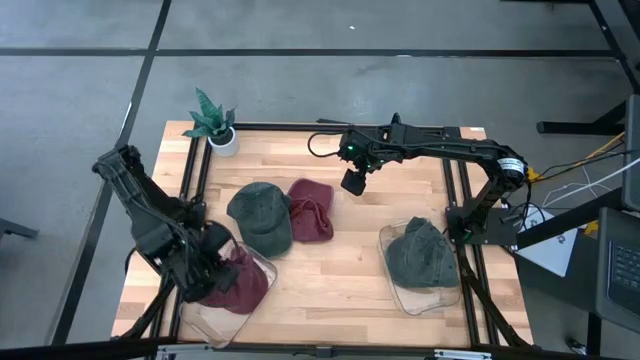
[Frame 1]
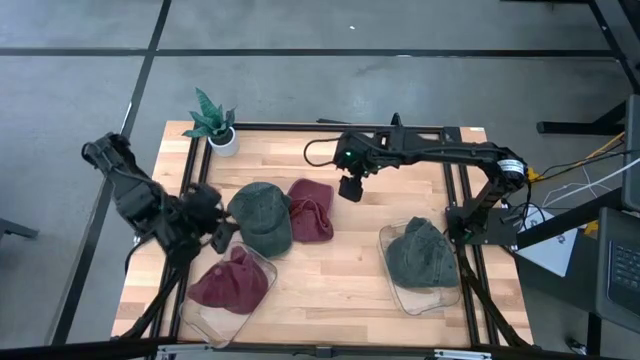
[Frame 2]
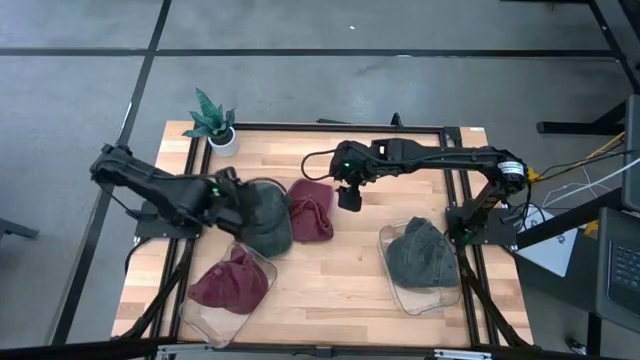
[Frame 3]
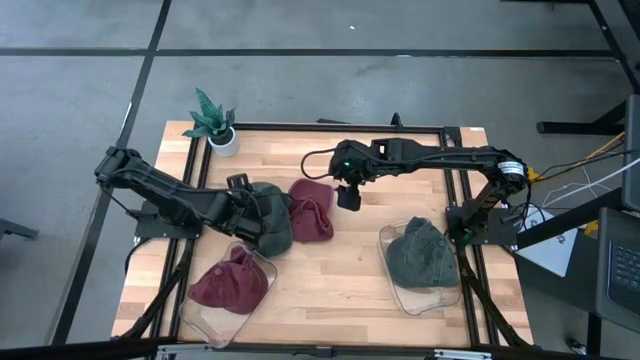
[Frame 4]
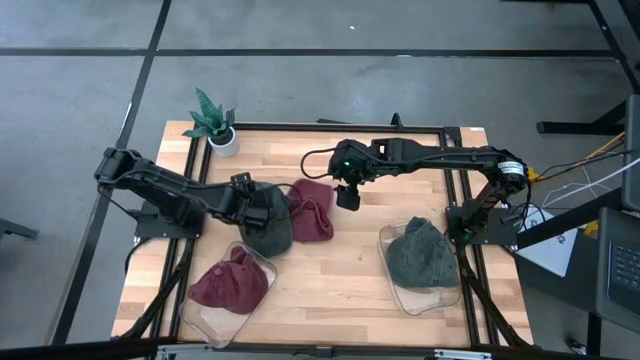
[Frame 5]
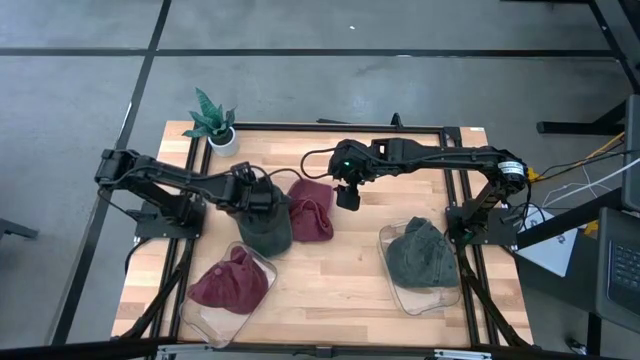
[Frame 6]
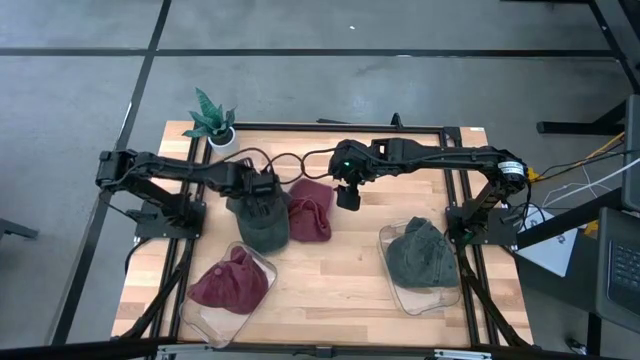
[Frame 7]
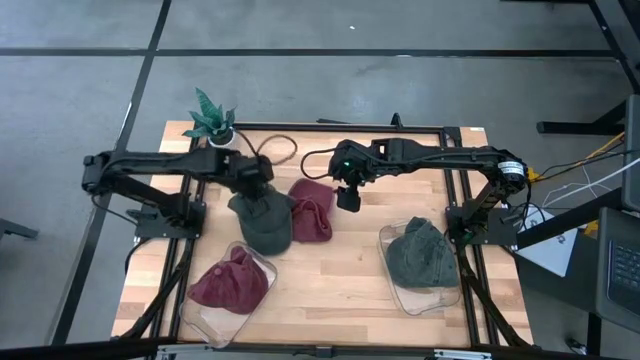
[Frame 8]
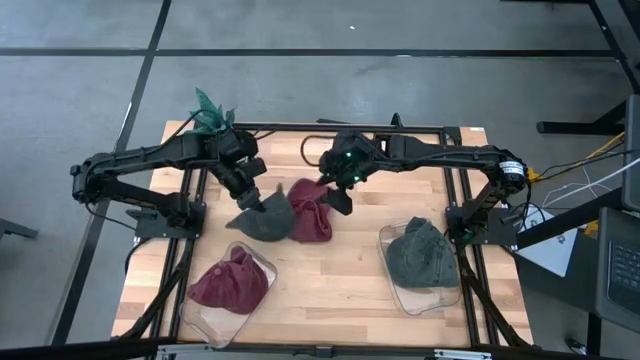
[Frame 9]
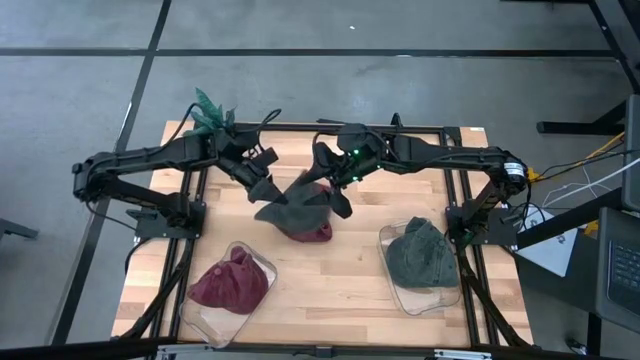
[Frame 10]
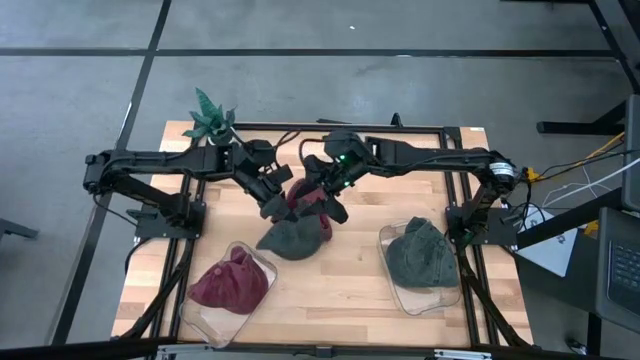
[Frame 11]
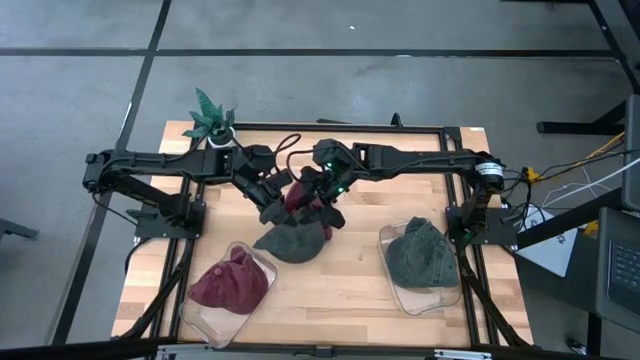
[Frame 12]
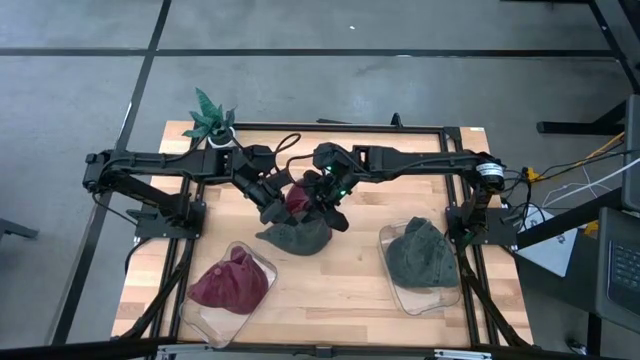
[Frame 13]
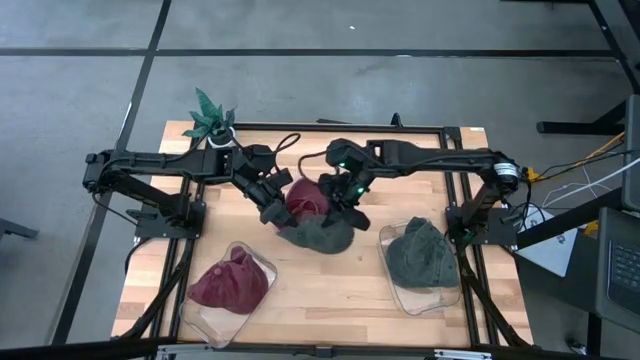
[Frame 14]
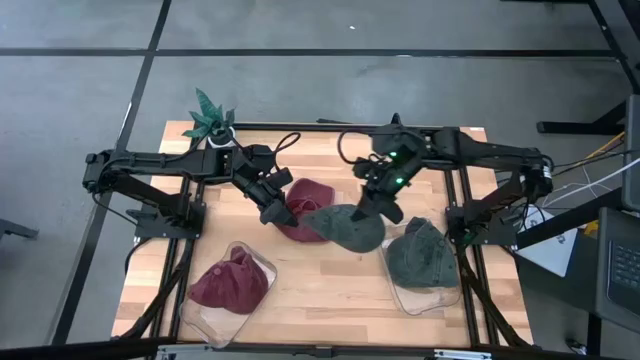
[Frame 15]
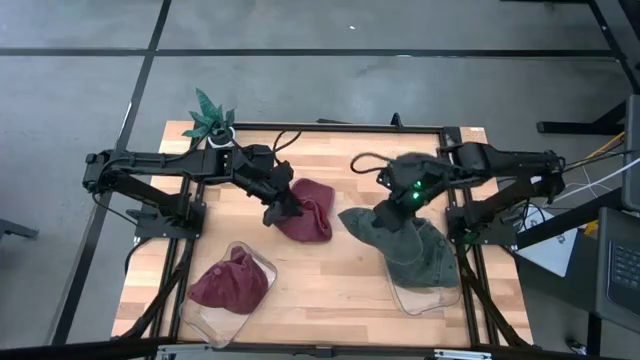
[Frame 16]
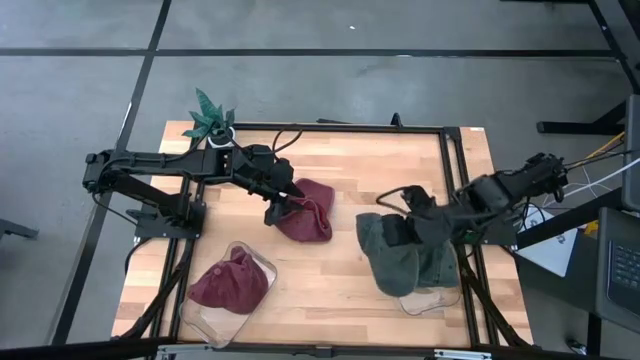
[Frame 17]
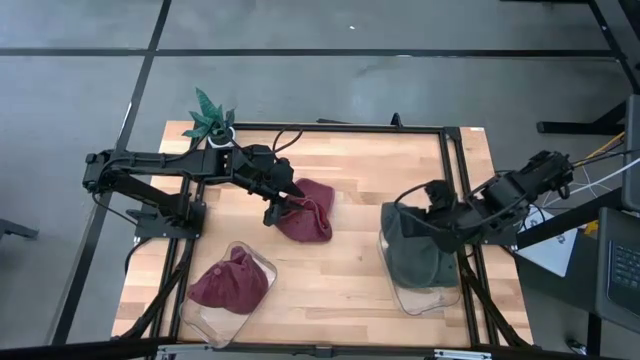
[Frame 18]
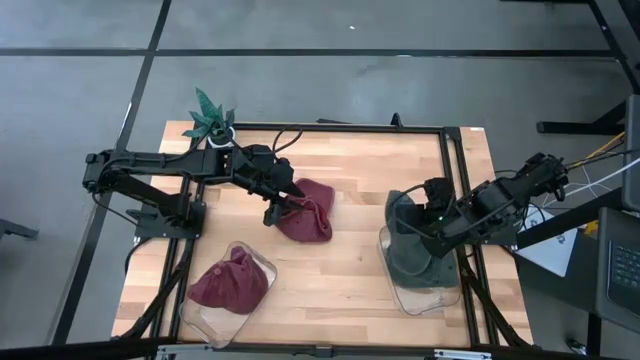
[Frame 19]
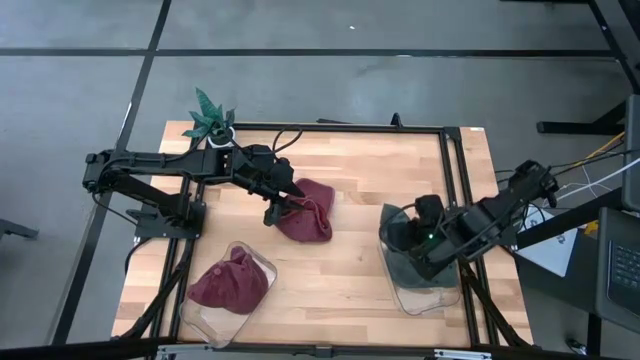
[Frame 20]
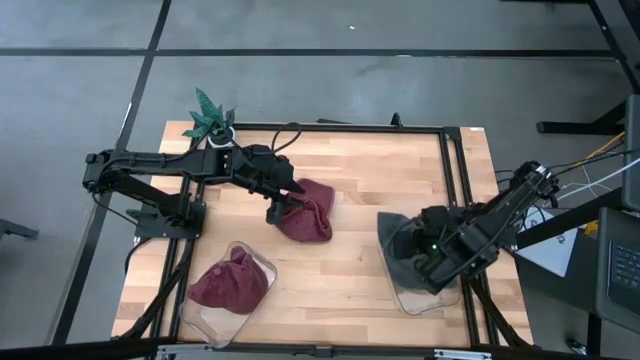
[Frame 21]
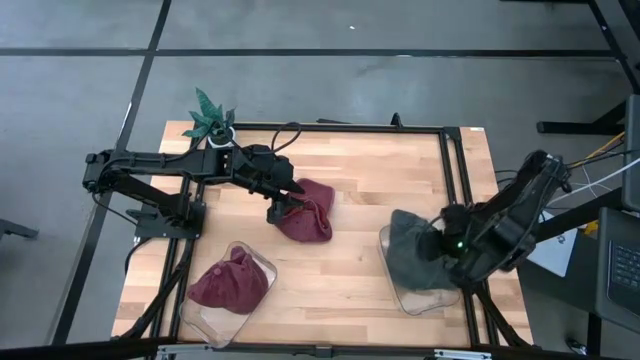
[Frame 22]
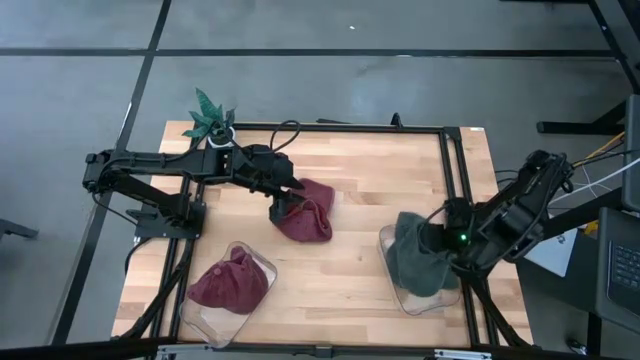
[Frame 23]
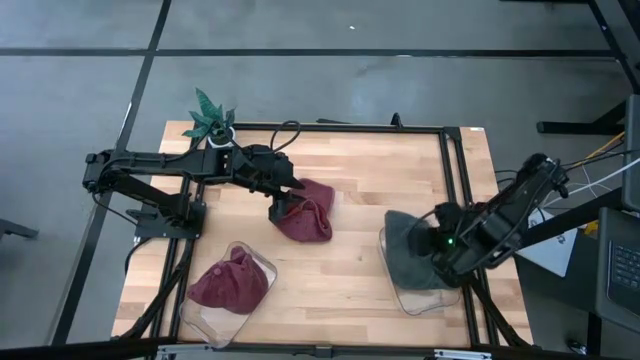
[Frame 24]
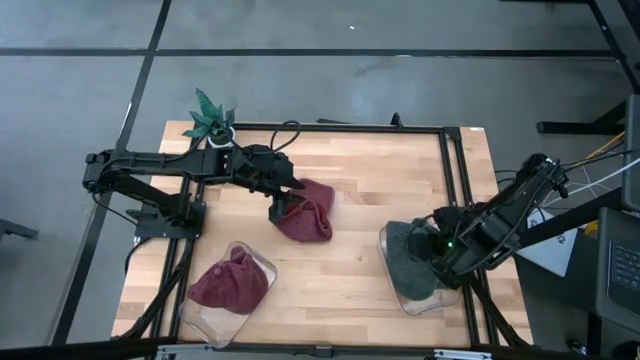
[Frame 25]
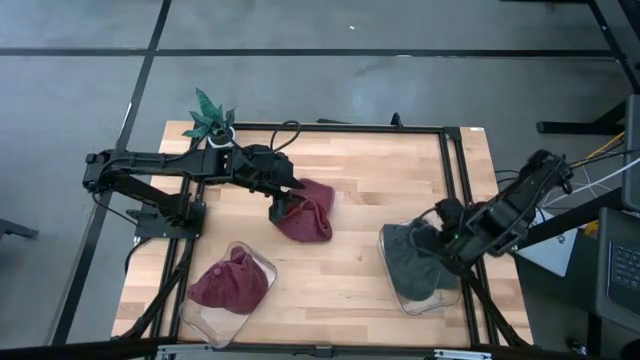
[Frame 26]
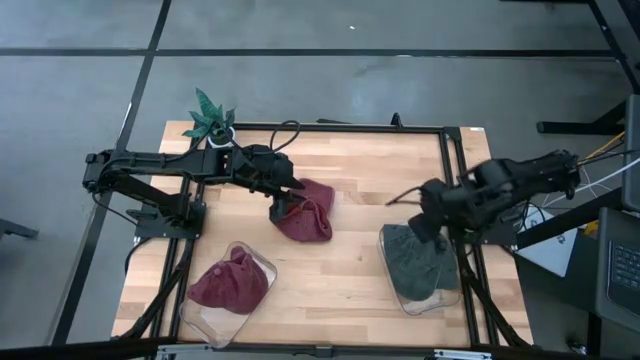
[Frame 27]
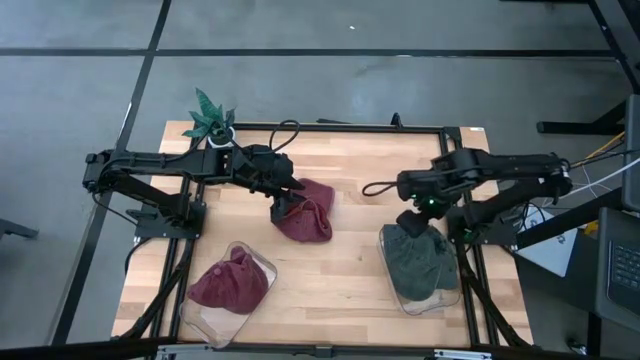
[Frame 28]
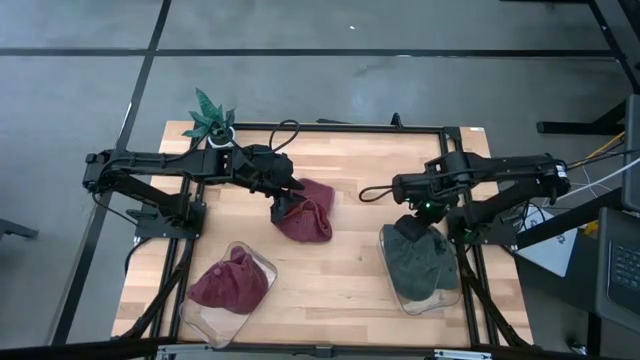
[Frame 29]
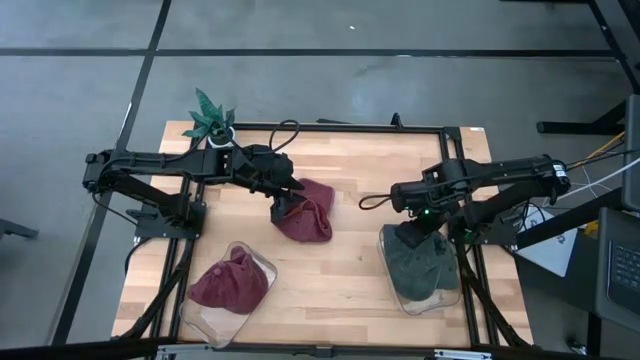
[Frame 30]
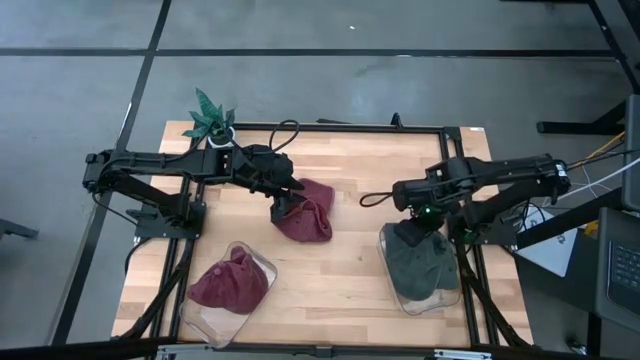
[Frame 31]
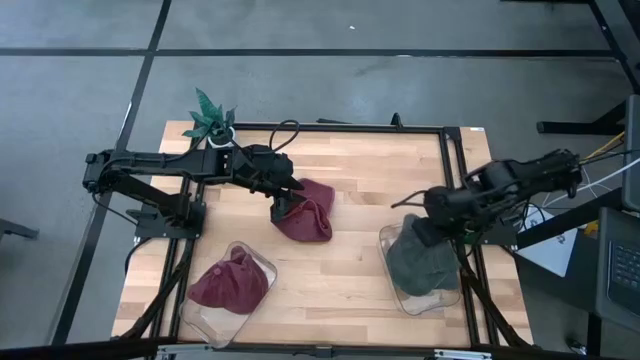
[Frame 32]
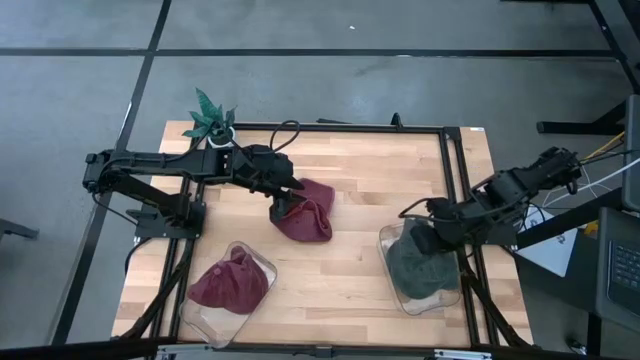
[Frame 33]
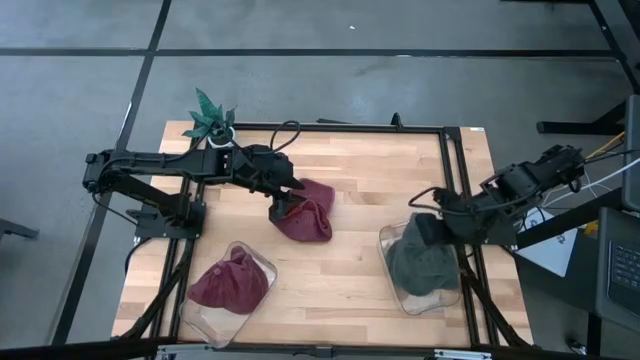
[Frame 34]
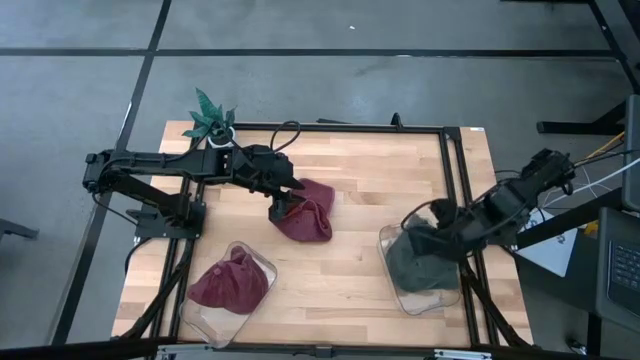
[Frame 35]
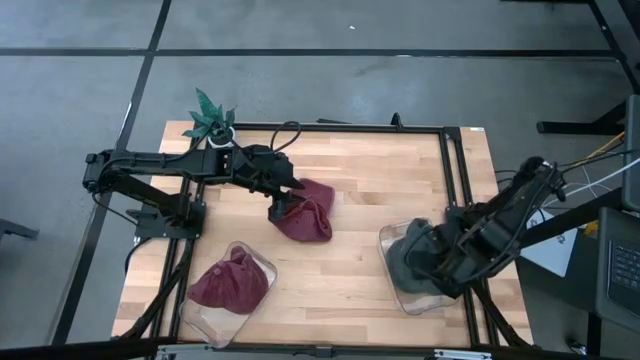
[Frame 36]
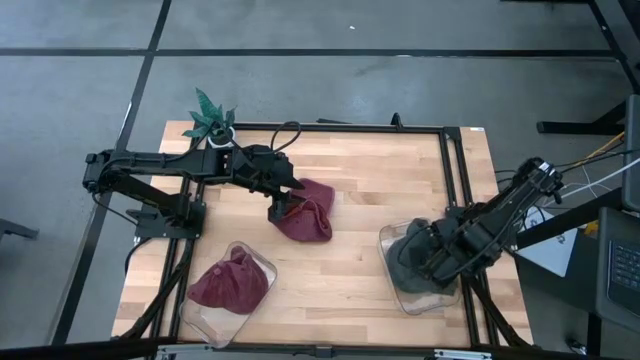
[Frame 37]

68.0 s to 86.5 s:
Task: Pick & Place hat
Put the green cap into the right transparent bin

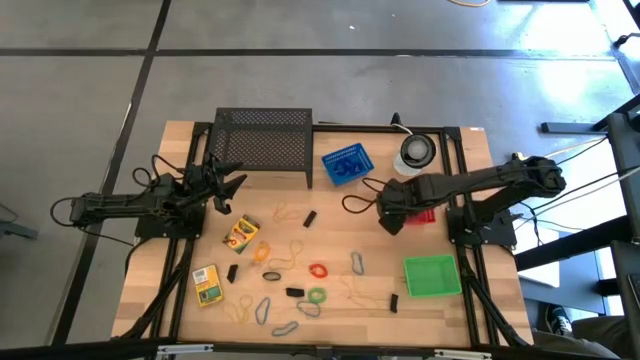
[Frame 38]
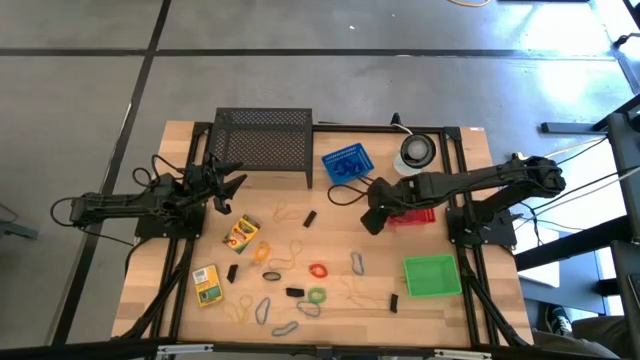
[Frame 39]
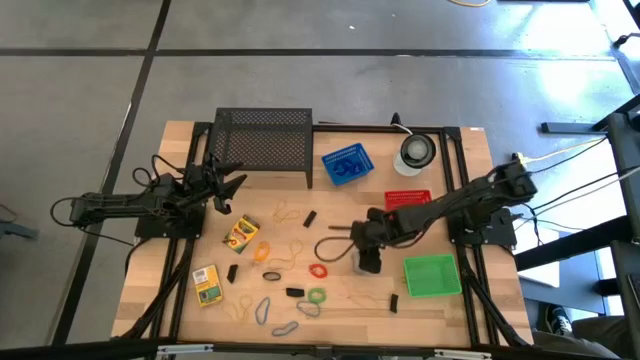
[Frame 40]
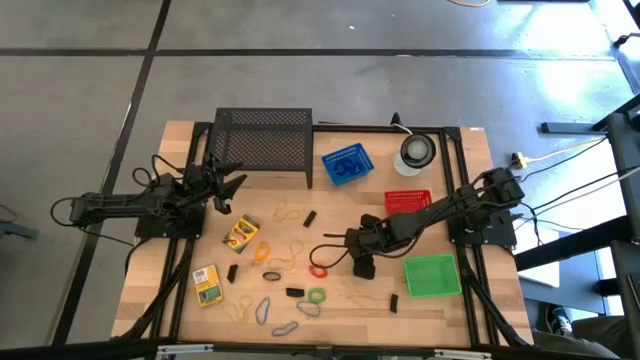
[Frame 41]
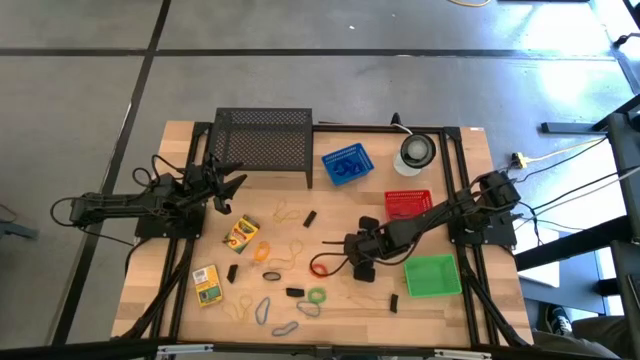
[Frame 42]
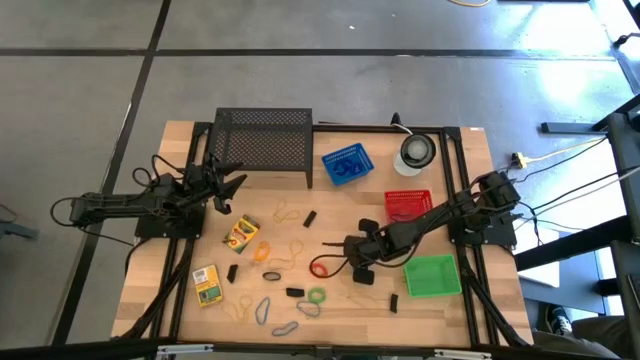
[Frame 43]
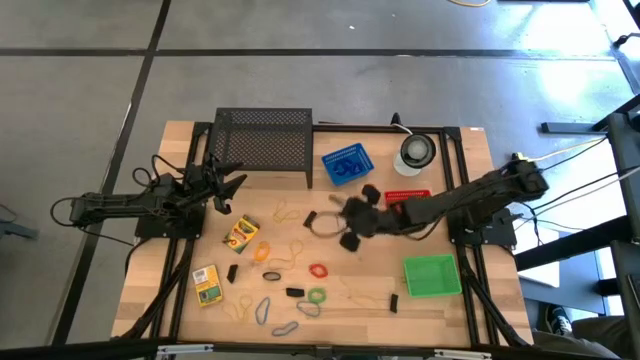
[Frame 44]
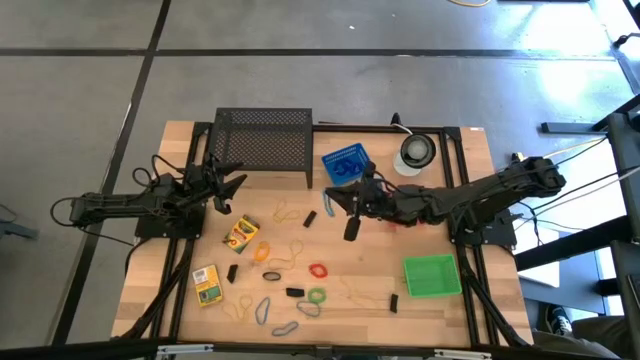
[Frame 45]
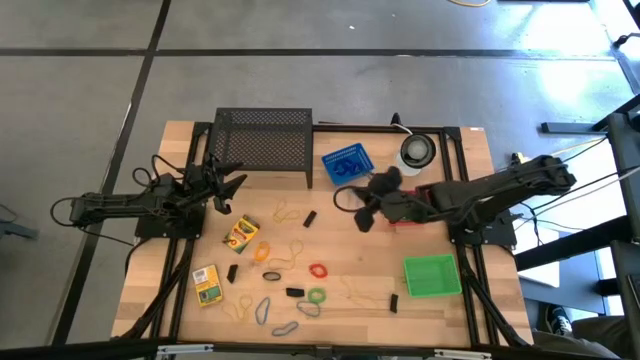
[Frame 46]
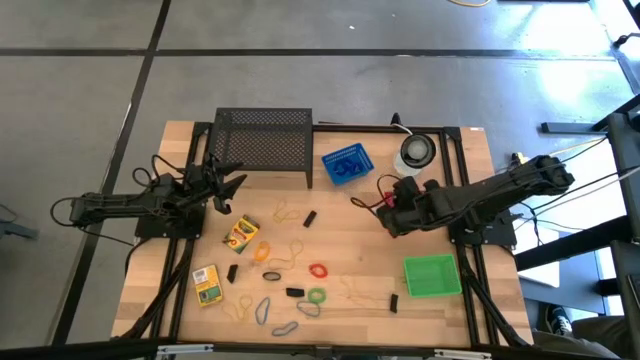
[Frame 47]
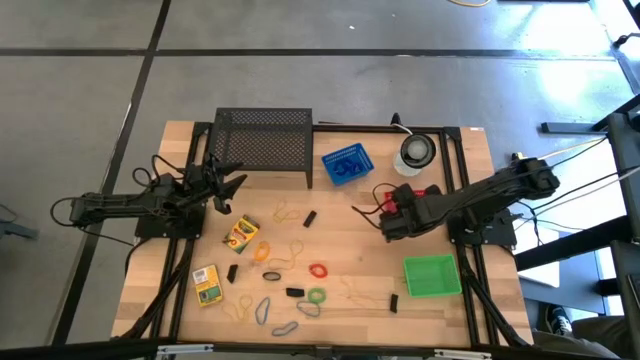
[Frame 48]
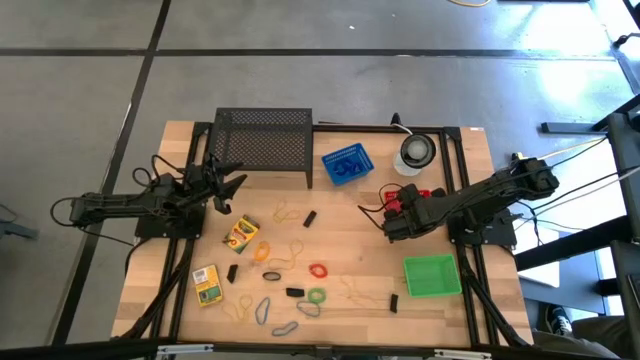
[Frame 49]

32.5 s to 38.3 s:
Task: Pick & Place Office Desk Supplies
Put the blue rubber band into the red bin
